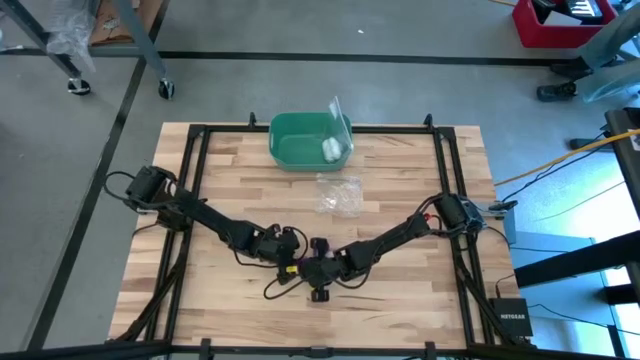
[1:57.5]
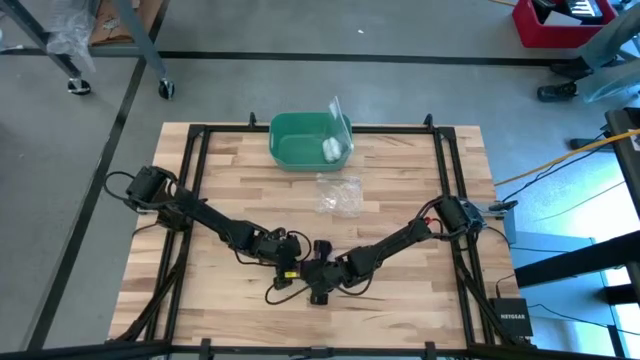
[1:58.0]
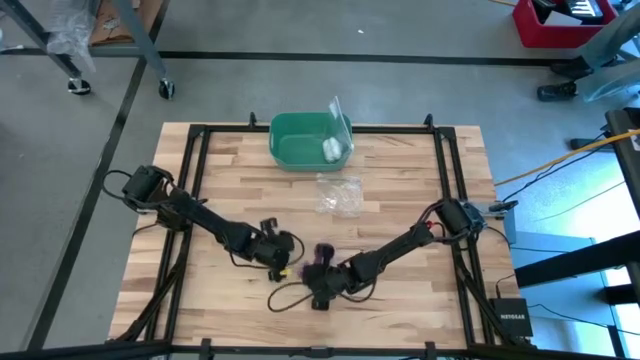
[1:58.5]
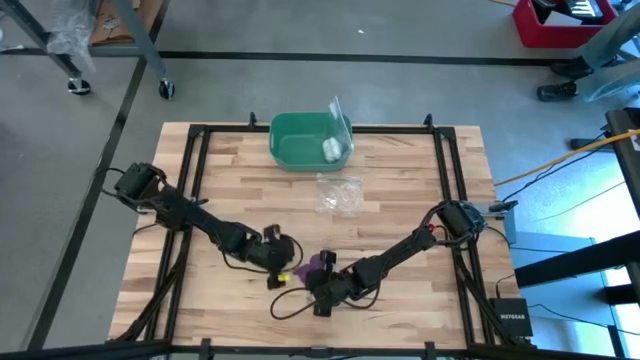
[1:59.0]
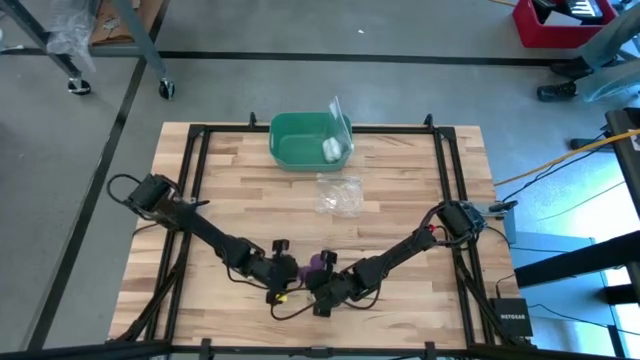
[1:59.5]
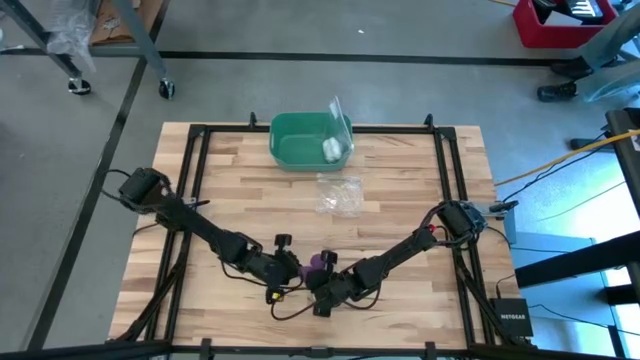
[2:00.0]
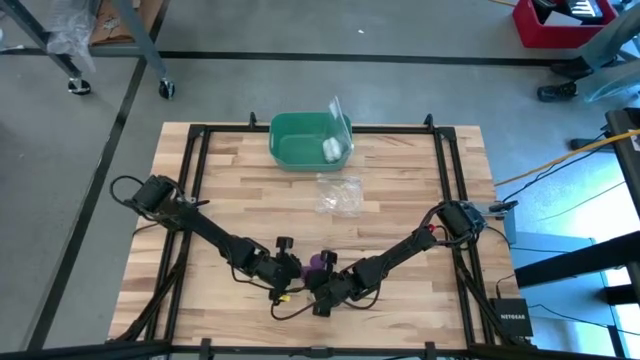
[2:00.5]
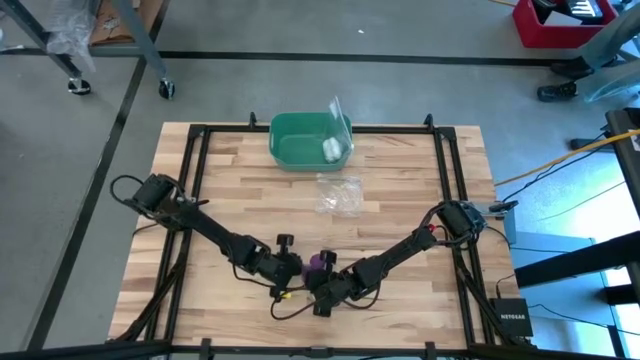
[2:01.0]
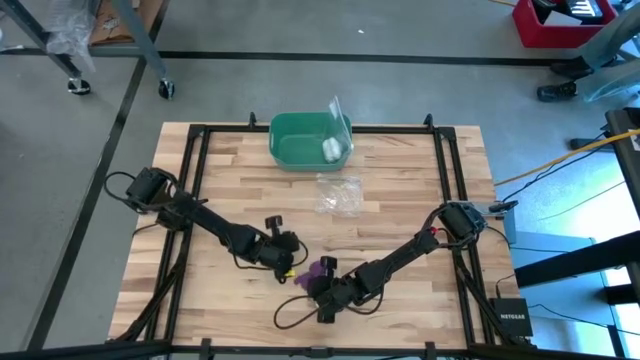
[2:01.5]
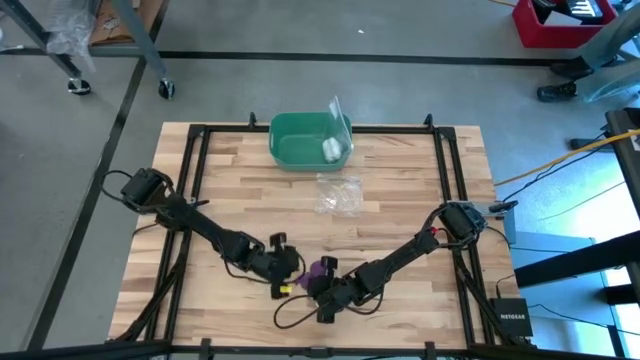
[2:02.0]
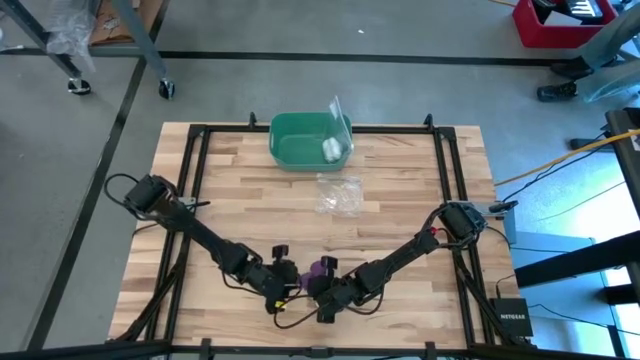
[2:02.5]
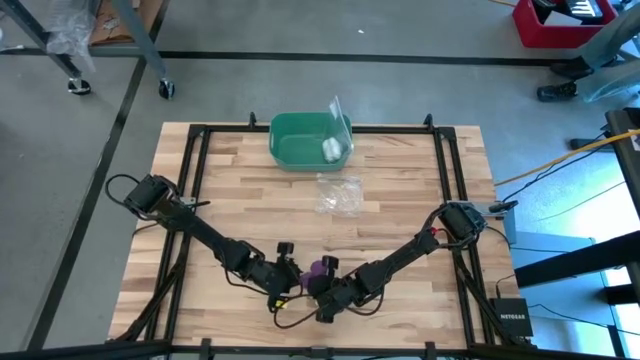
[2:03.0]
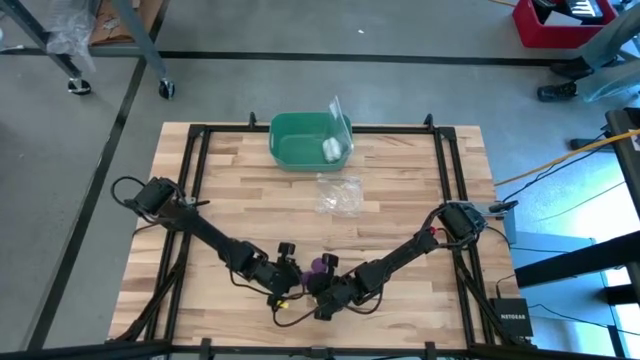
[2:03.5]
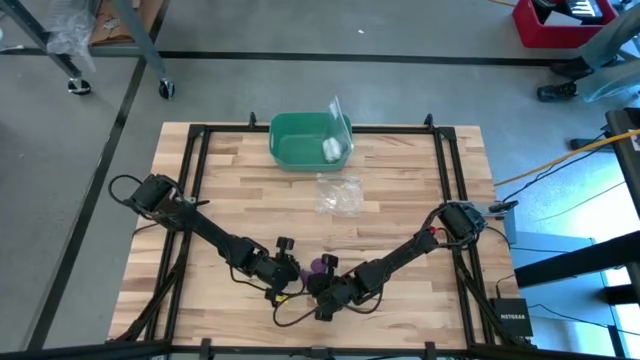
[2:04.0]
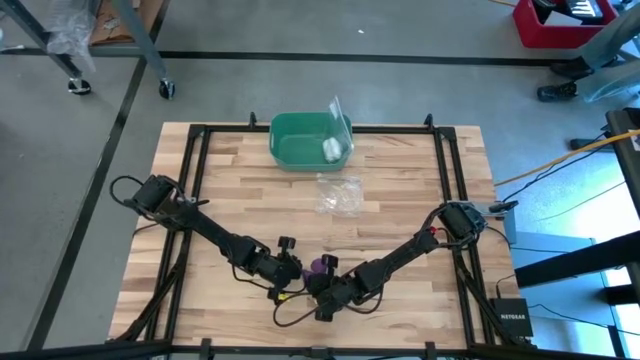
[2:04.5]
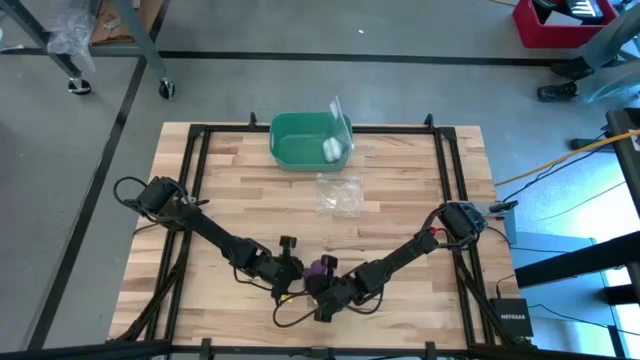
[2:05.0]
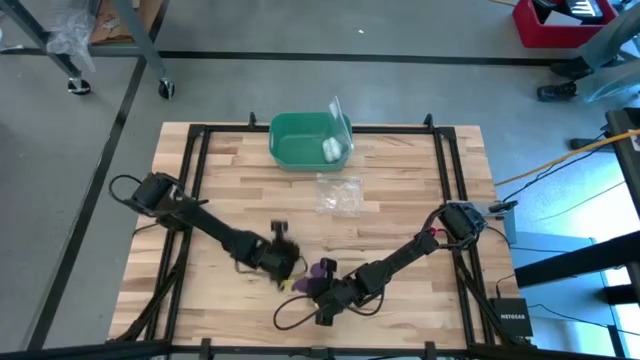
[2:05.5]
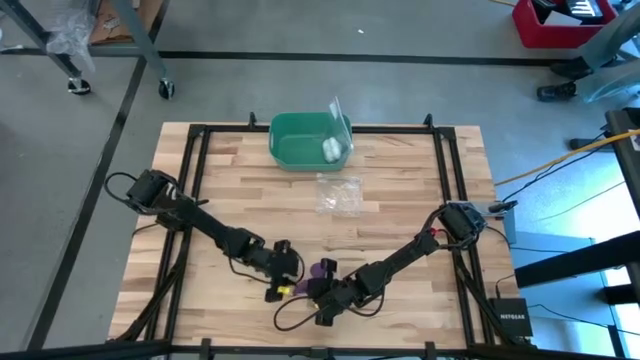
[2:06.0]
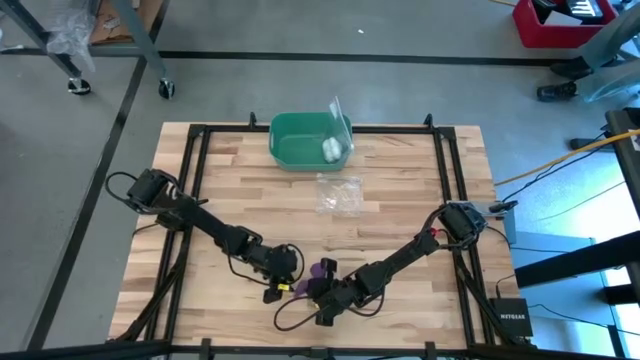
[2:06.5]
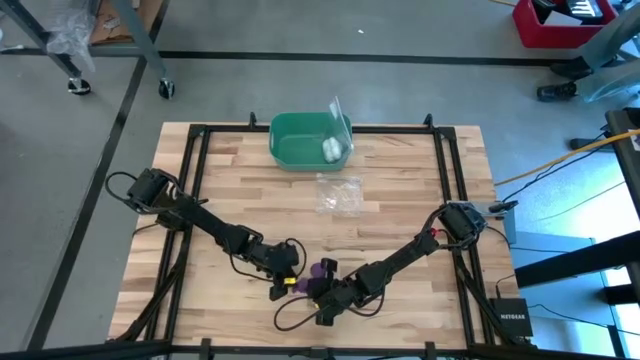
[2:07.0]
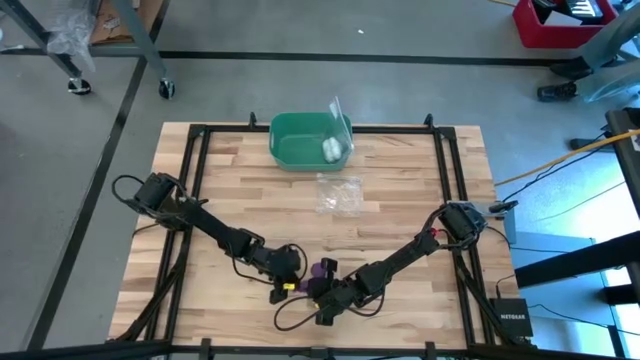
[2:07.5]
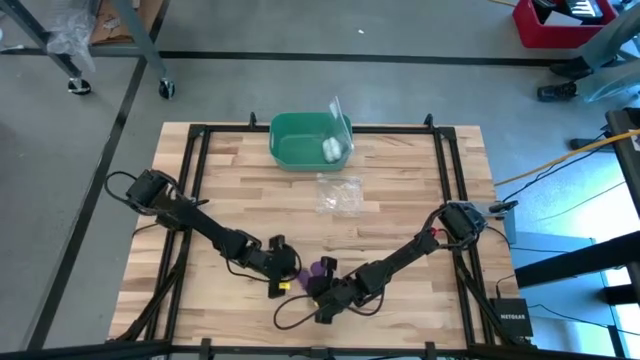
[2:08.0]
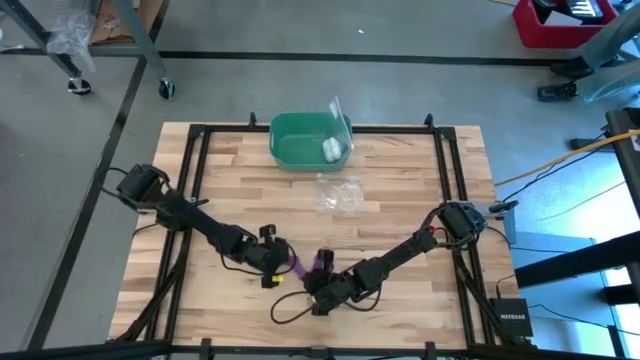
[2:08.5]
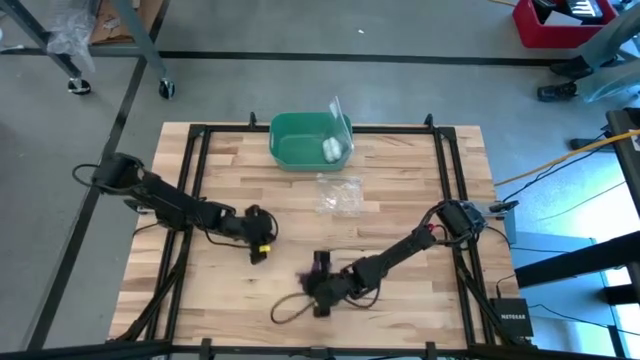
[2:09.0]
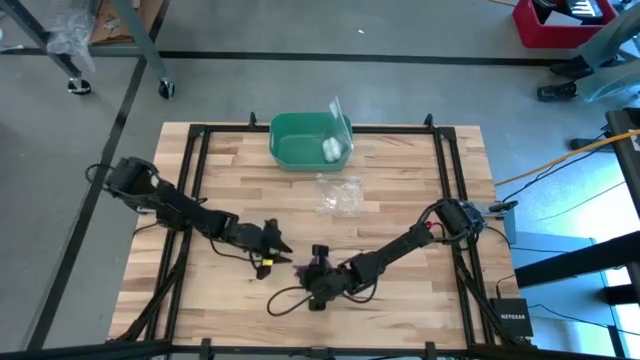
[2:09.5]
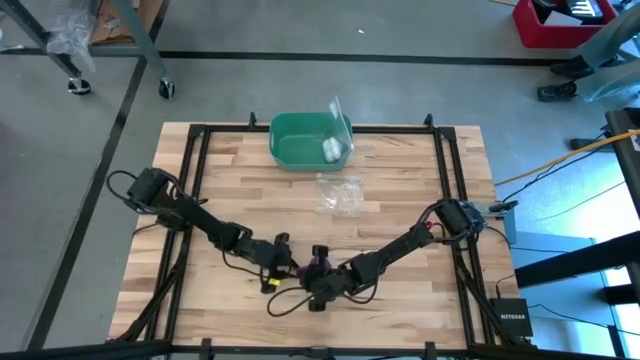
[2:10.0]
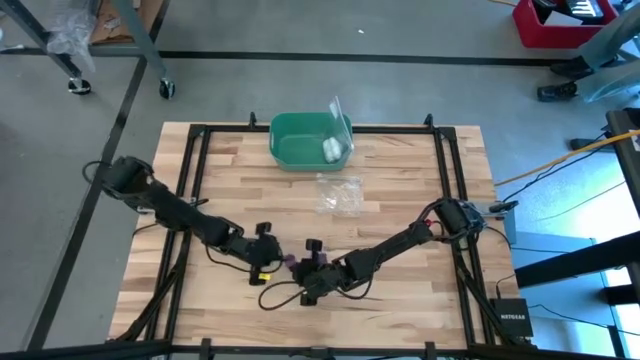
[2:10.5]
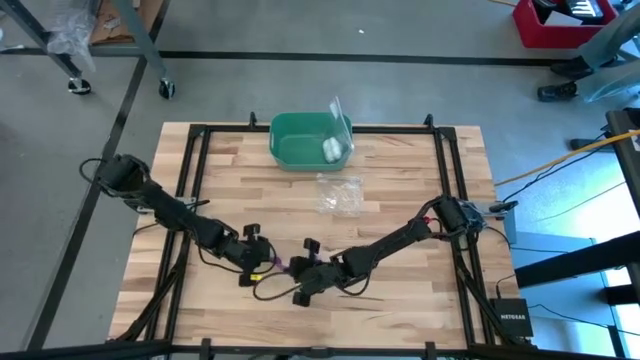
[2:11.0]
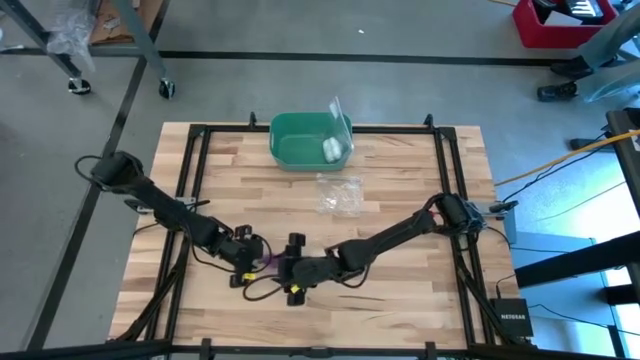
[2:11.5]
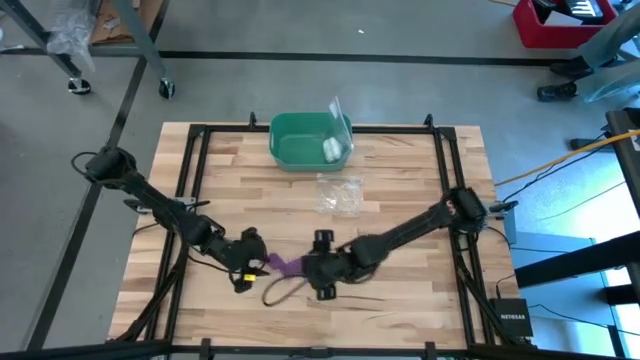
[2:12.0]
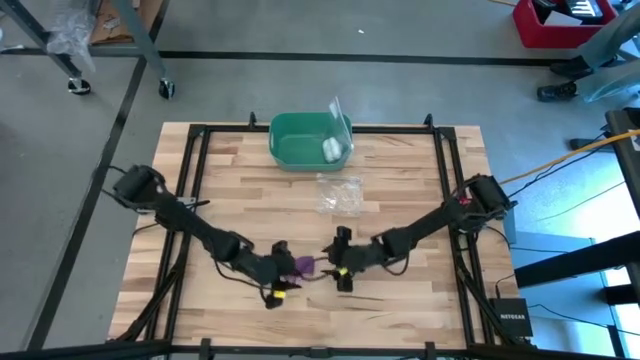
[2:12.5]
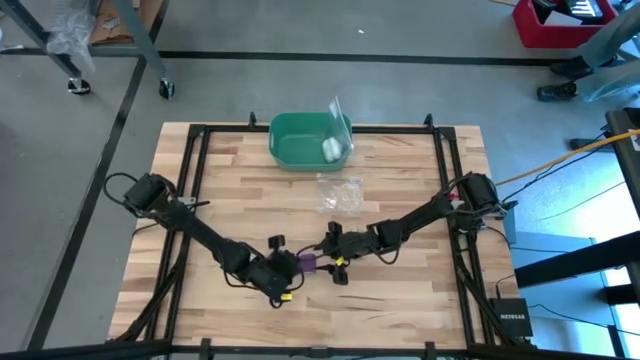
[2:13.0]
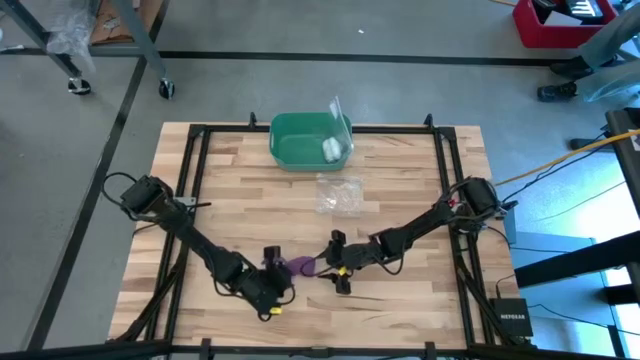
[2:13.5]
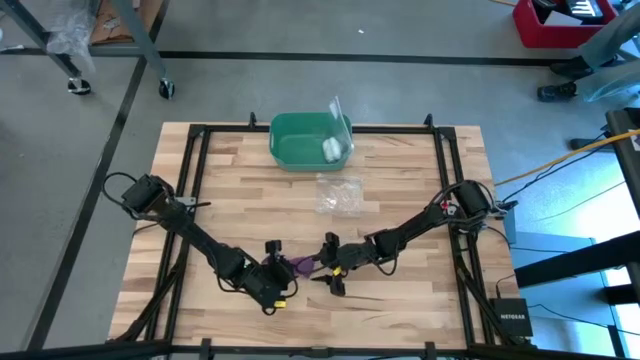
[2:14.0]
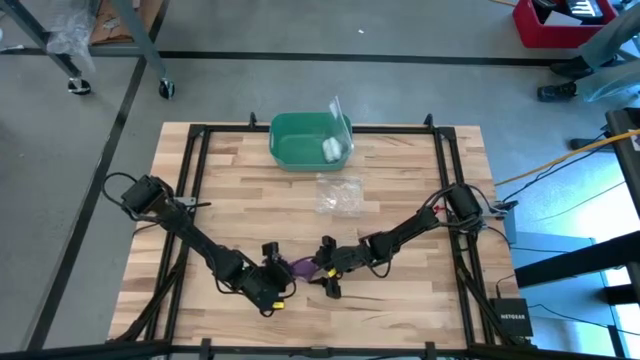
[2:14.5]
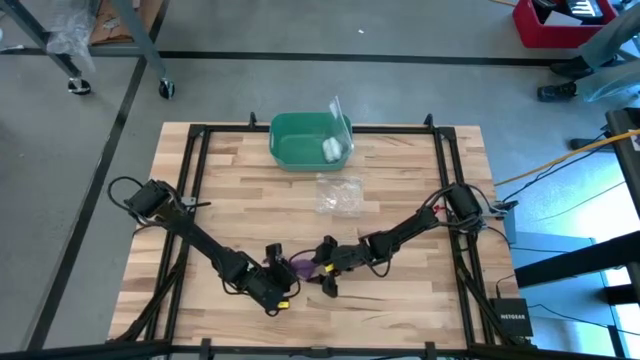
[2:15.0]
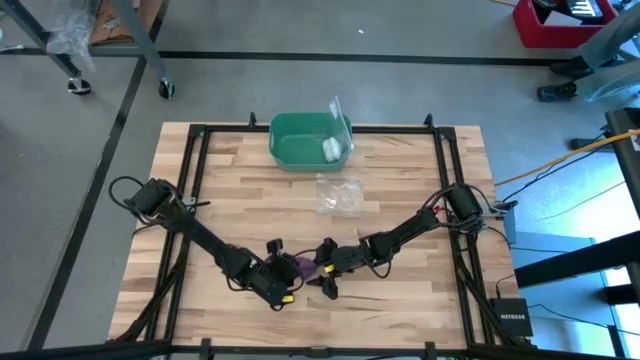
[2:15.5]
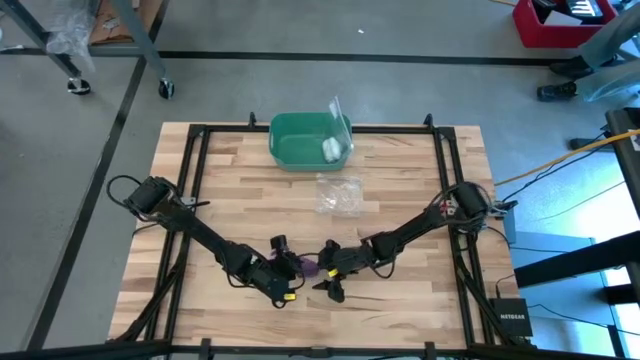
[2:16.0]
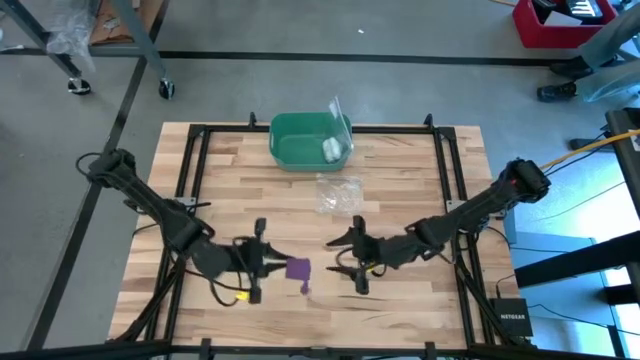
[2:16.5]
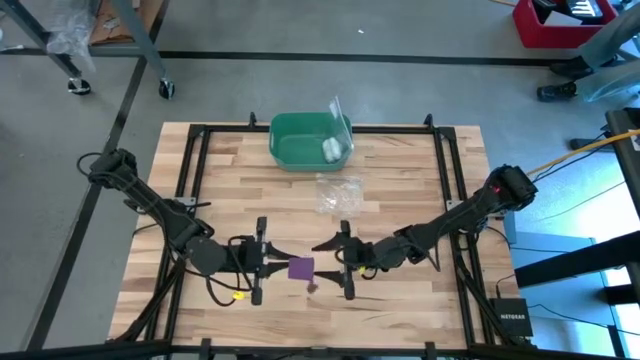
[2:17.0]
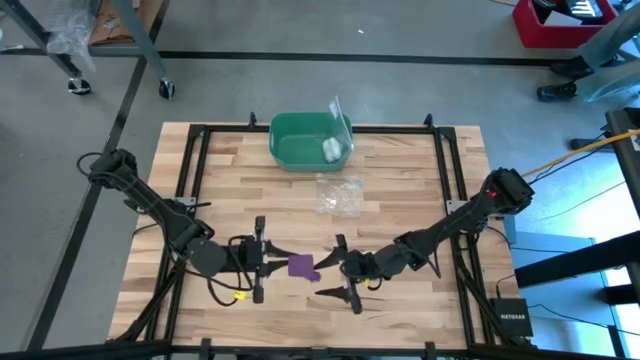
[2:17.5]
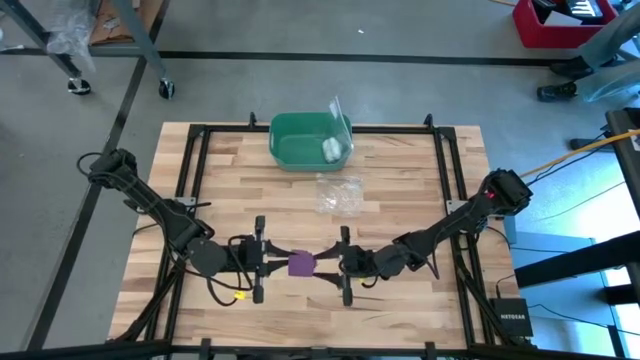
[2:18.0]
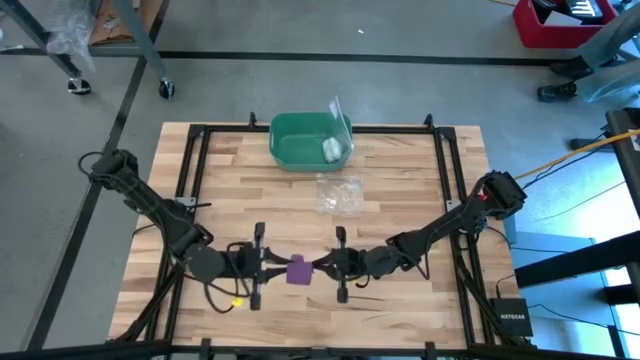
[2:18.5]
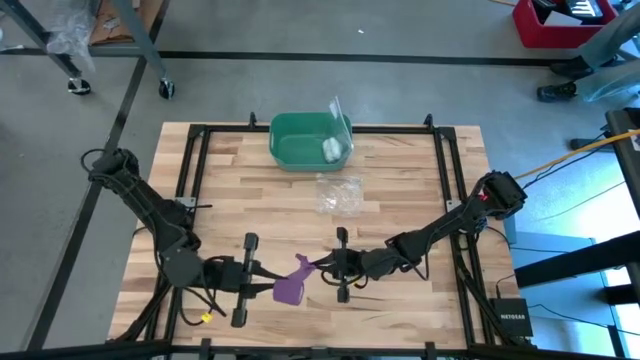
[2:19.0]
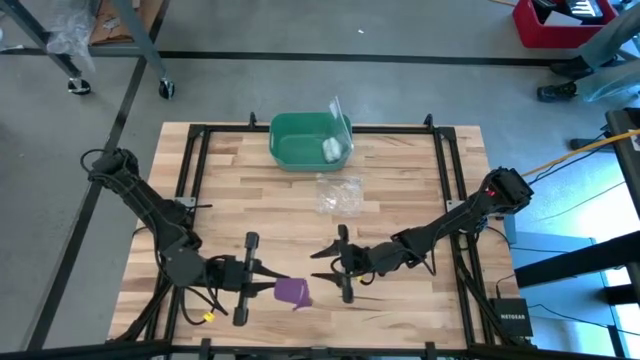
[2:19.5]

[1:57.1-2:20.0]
Task: Roll bandage
Roll the violet bandage
